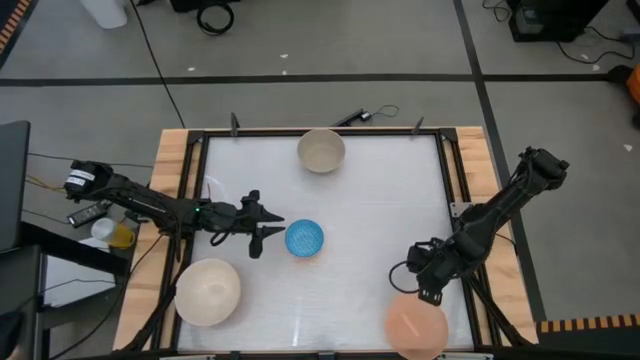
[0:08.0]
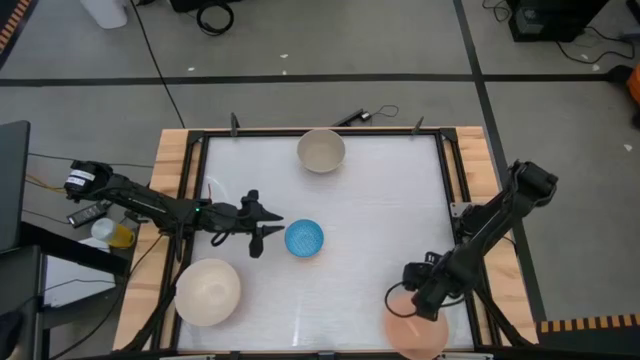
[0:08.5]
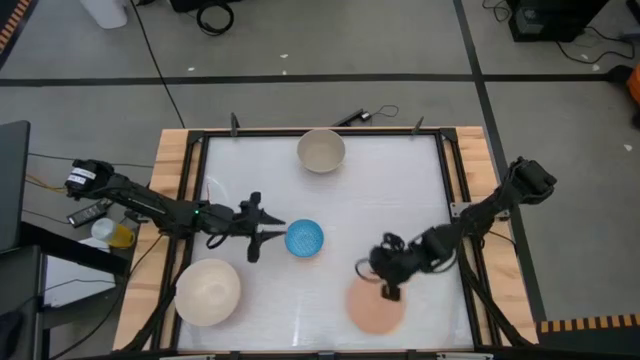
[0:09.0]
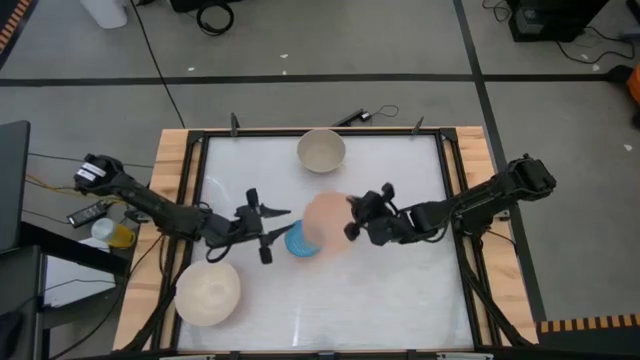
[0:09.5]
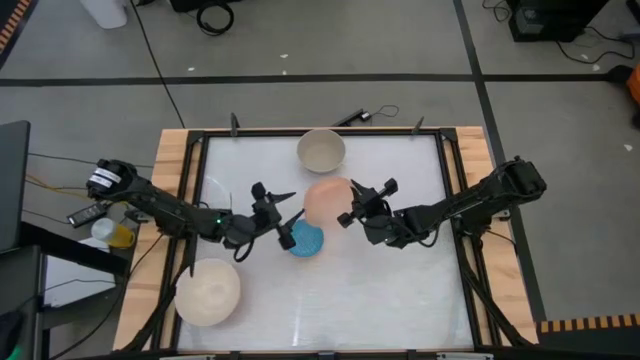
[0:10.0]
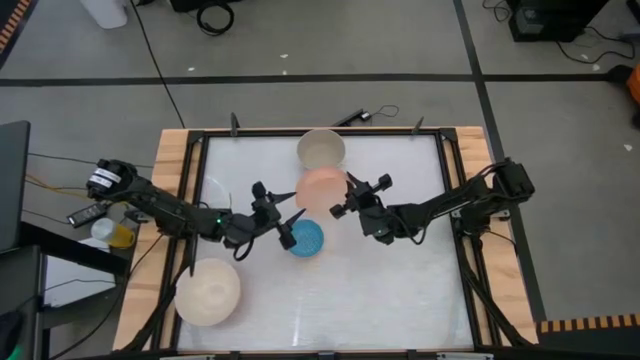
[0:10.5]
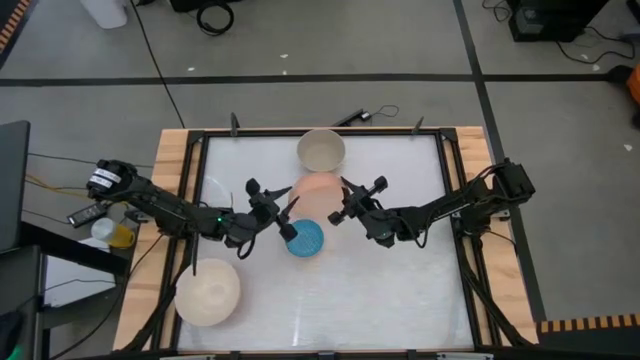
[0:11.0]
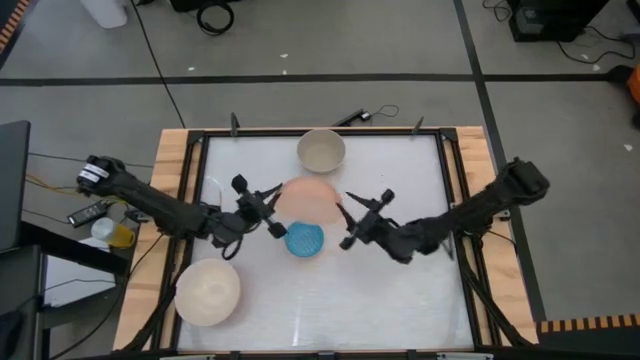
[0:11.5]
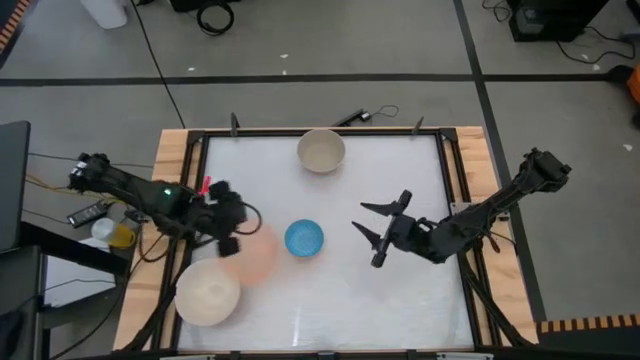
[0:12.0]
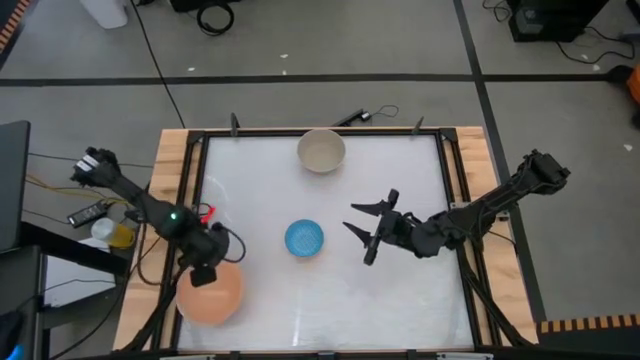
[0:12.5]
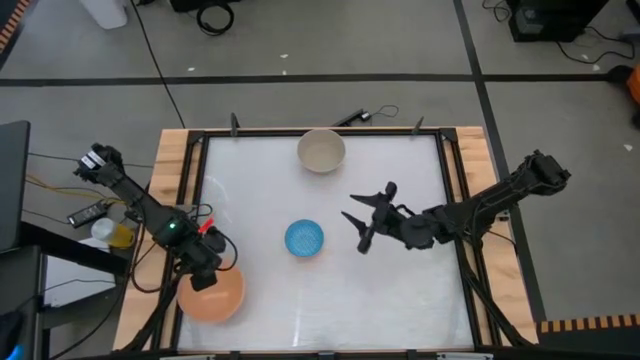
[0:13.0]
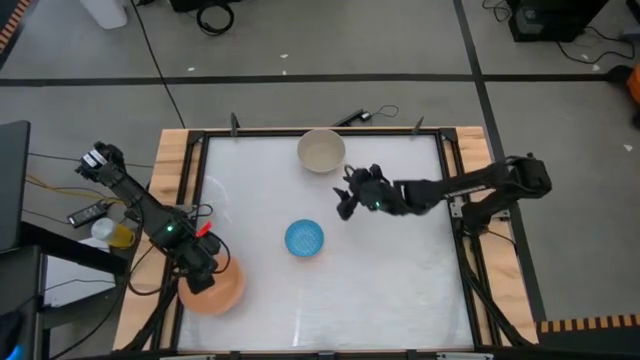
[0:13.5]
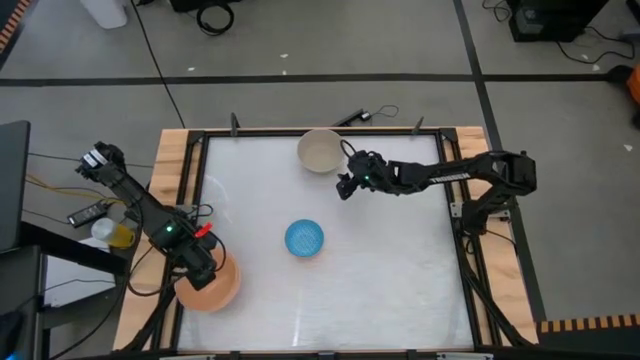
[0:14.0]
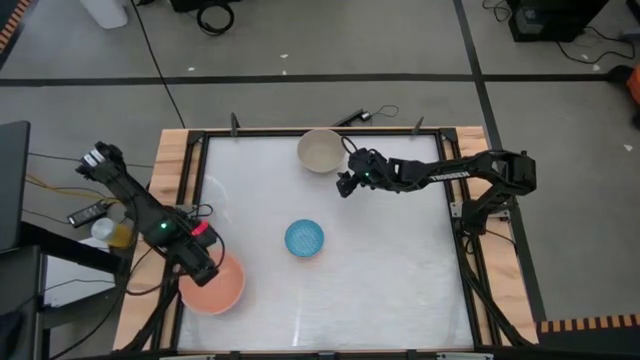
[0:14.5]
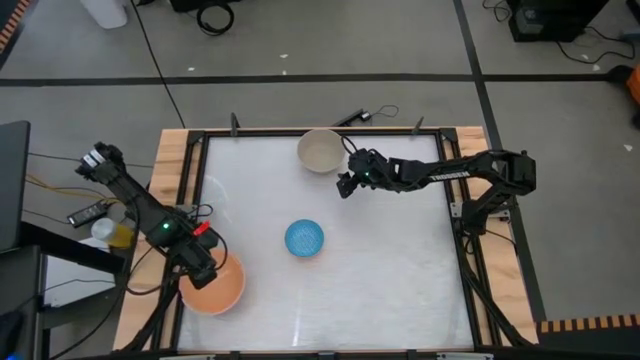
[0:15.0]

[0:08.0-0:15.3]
Stack the orange bowl on top of the big white bowl

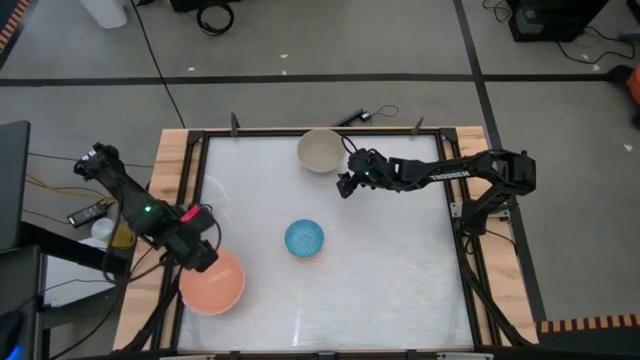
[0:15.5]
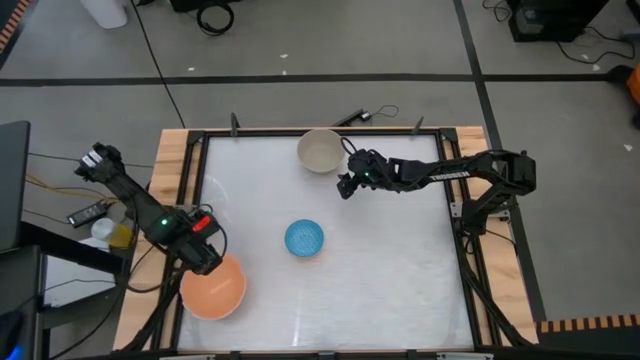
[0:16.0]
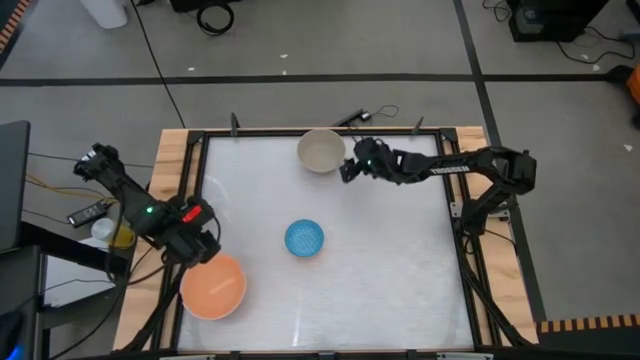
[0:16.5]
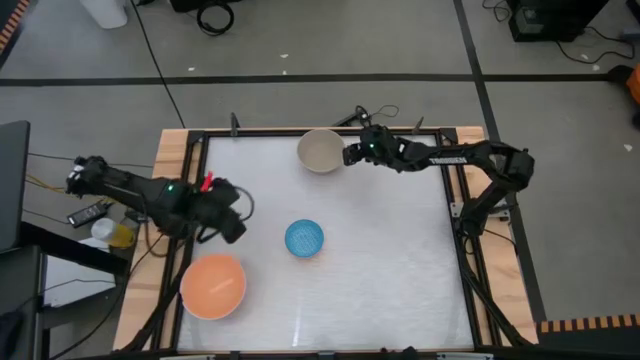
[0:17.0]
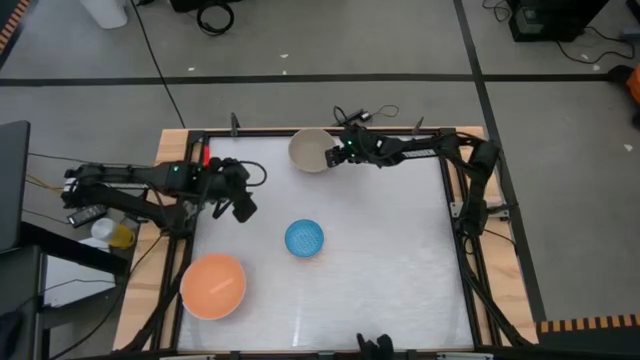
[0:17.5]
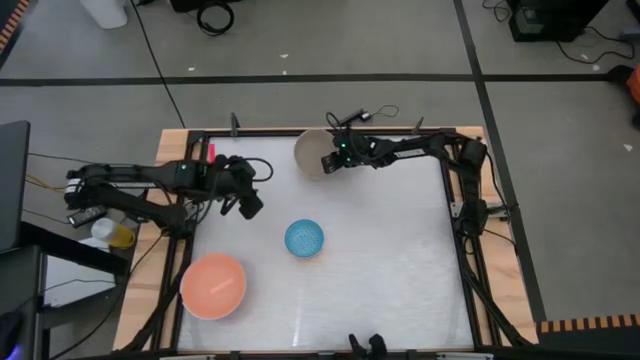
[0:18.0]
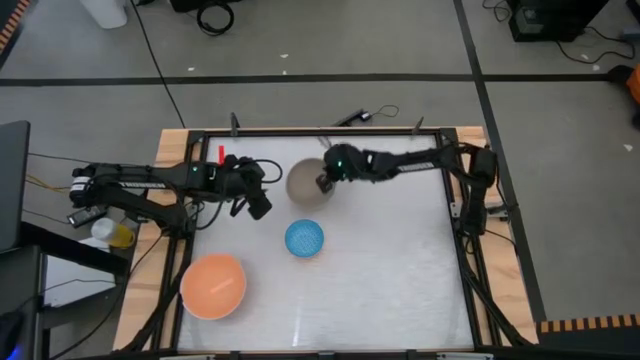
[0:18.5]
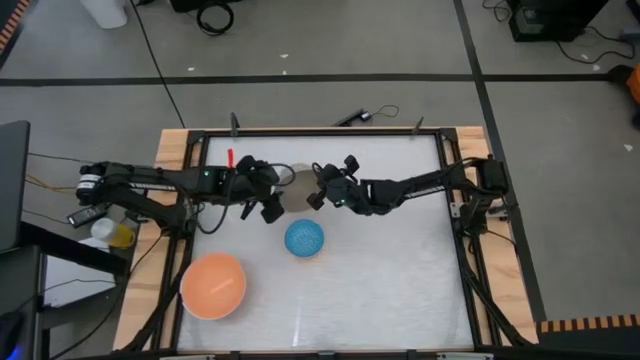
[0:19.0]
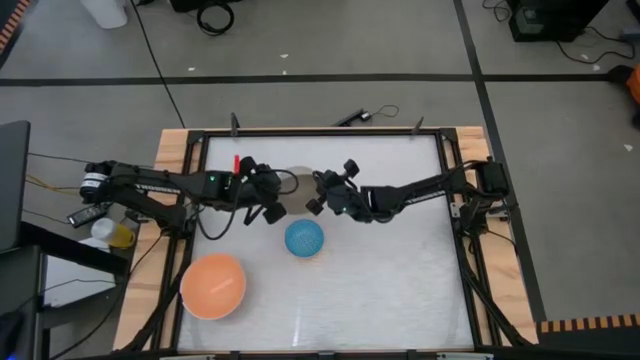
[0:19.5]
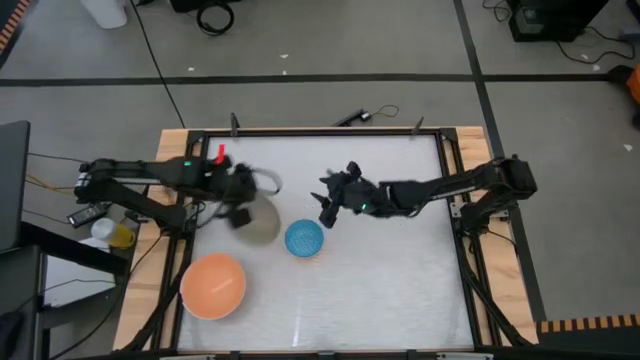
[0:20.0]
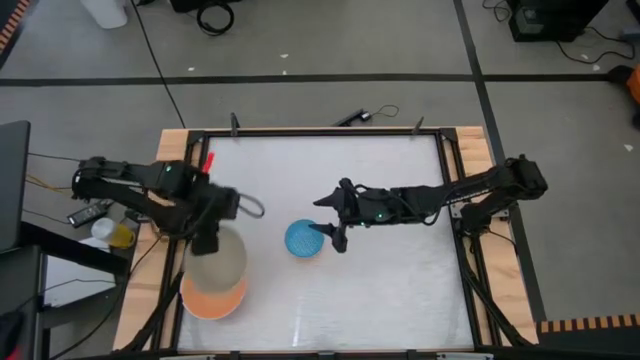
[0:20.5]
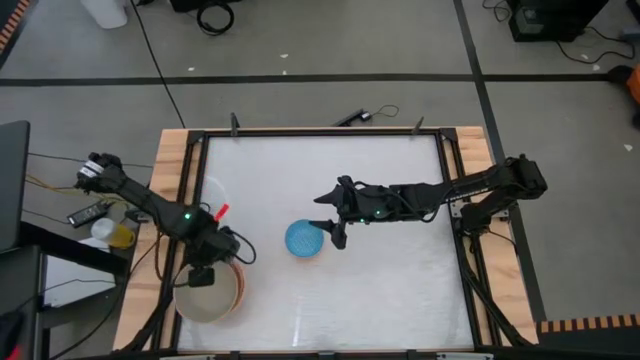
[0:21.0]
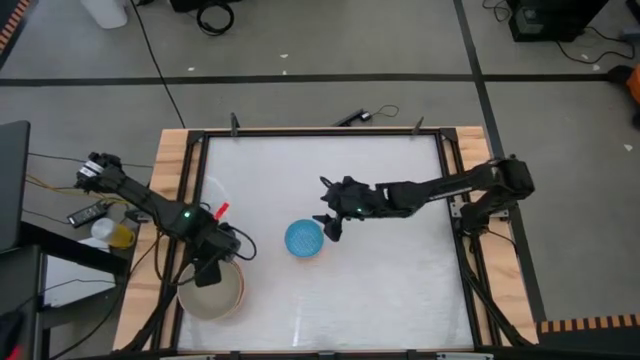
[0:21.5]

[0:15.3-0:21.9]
Stack the gray bowl on top of the orange bowl

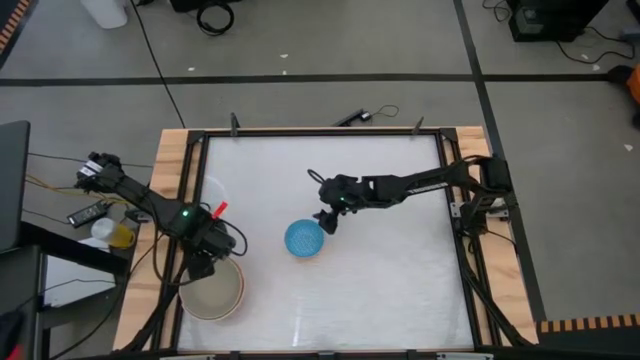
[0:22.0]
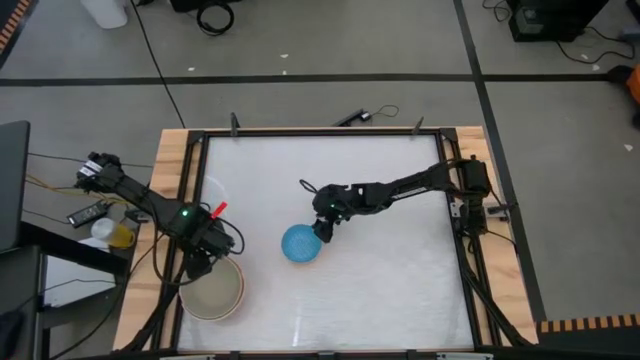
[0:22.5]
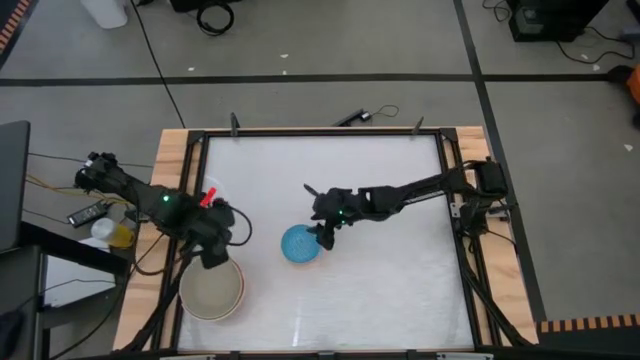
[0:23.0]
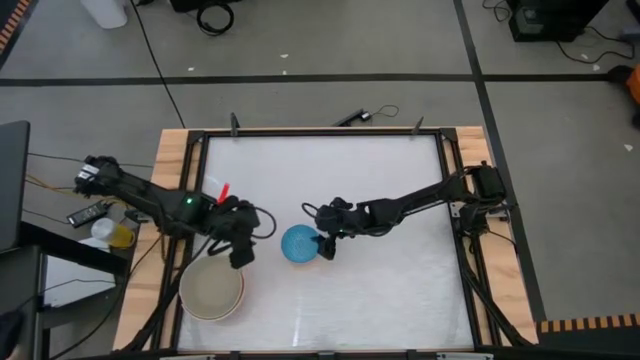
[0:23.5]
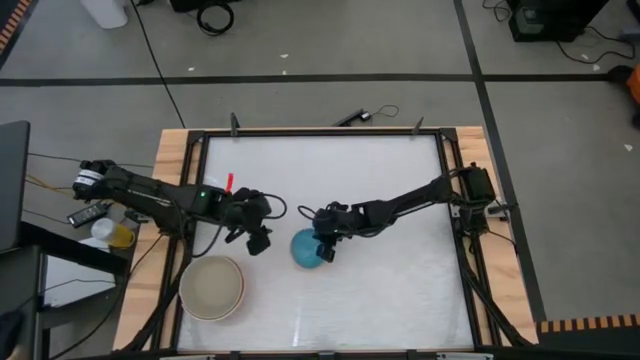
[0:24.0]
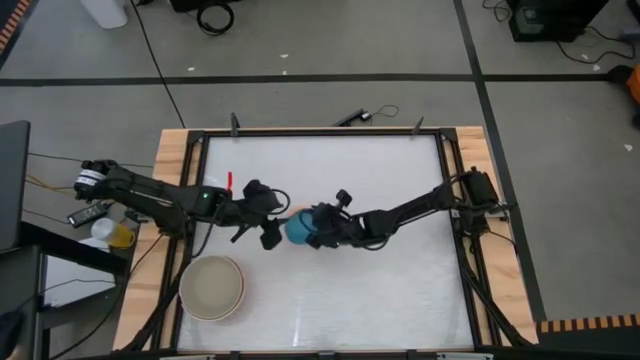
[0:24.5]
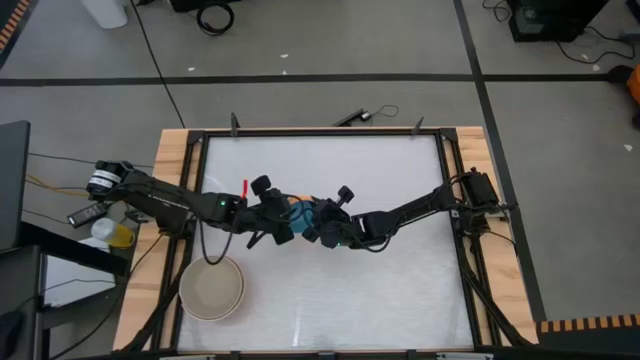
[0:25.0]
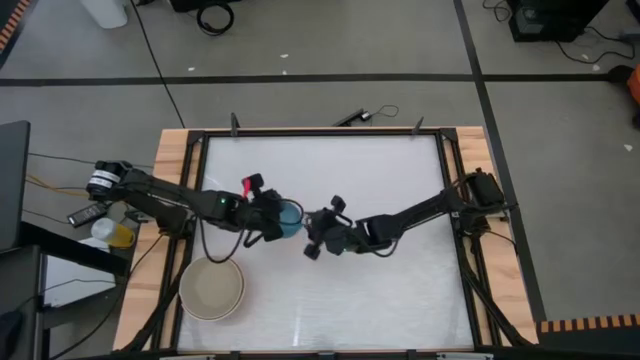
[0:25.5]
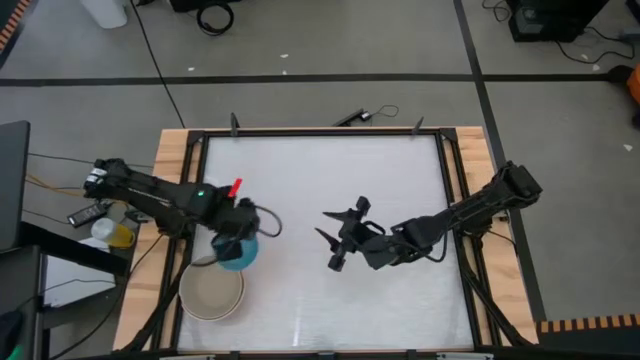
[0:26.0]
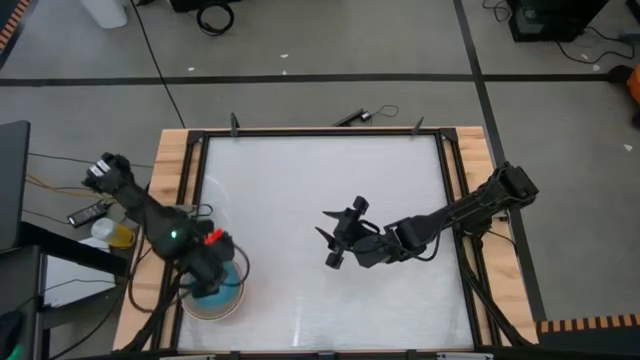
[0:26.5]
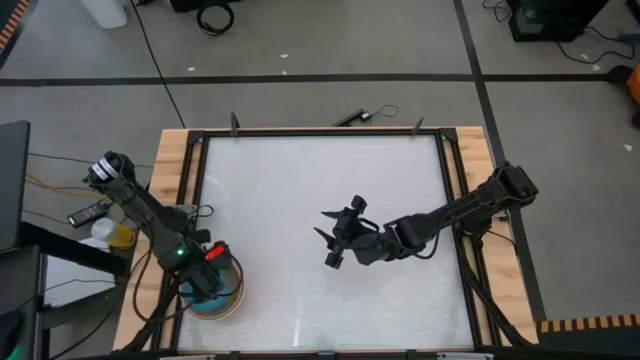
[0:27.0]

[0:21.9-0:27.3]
Stack the blue bowl on top of the white bowl
